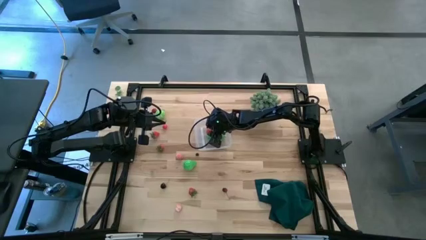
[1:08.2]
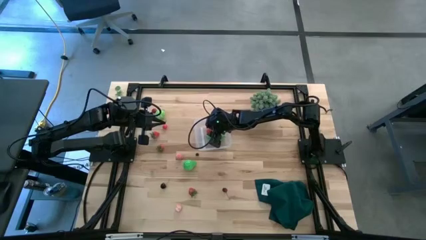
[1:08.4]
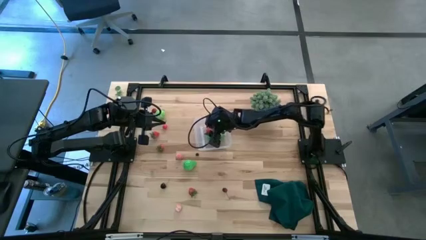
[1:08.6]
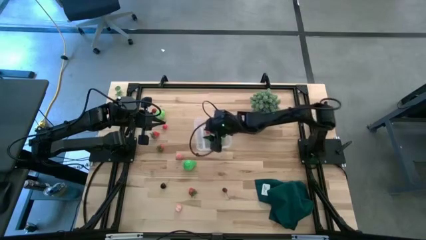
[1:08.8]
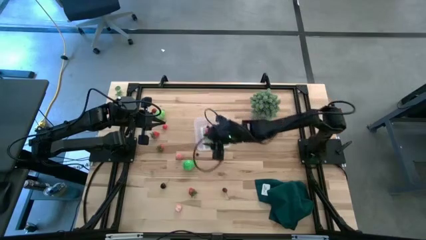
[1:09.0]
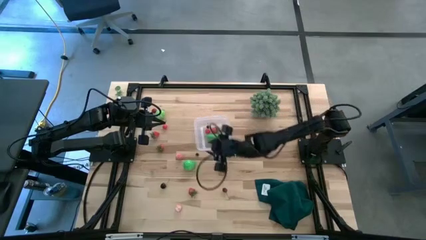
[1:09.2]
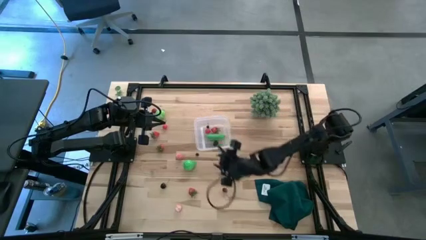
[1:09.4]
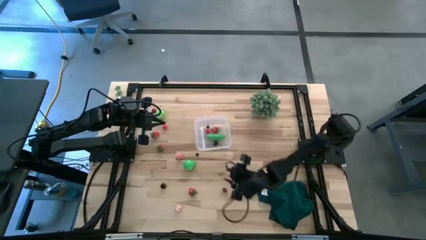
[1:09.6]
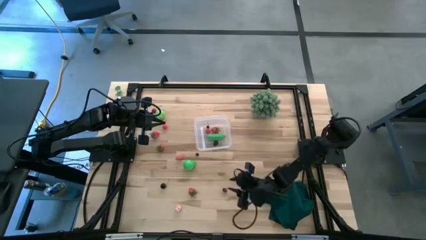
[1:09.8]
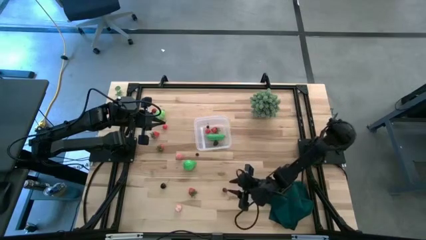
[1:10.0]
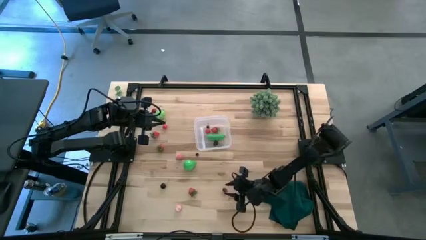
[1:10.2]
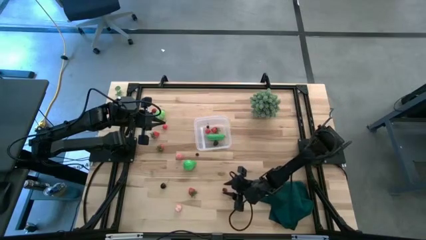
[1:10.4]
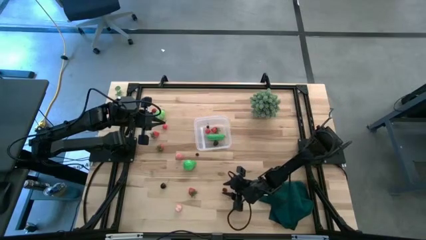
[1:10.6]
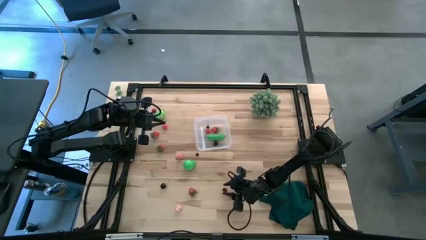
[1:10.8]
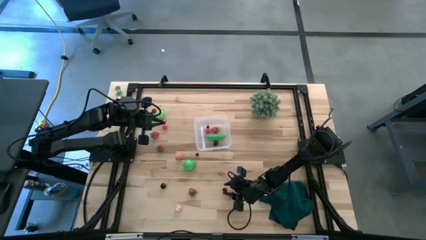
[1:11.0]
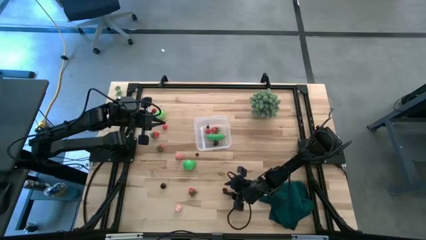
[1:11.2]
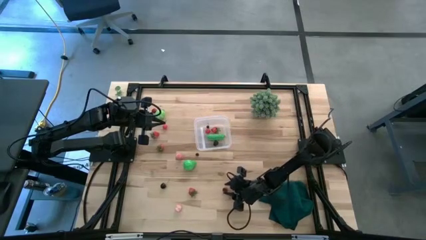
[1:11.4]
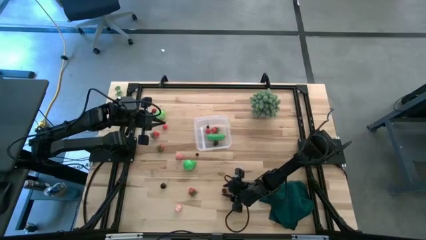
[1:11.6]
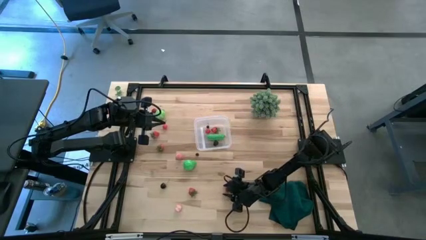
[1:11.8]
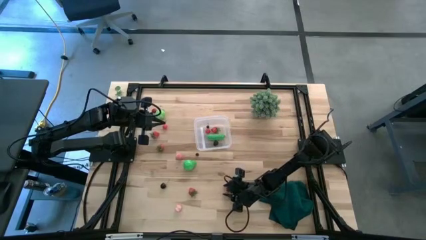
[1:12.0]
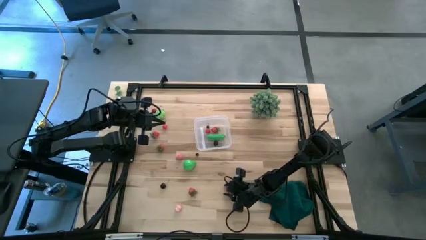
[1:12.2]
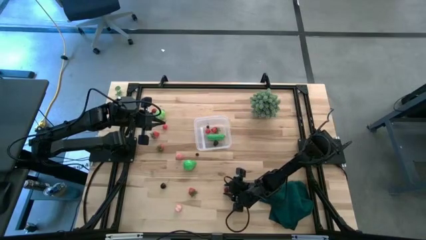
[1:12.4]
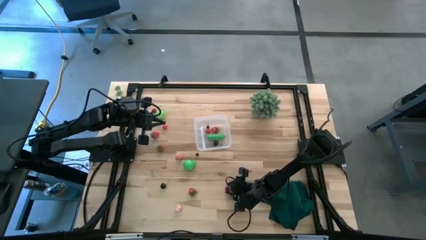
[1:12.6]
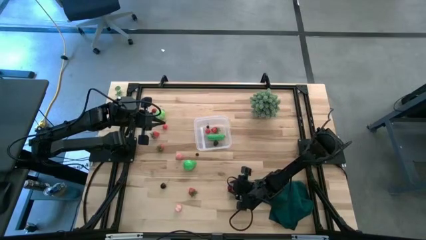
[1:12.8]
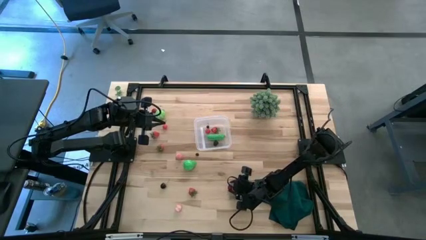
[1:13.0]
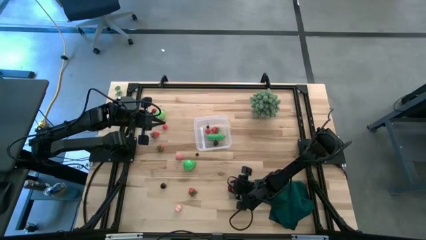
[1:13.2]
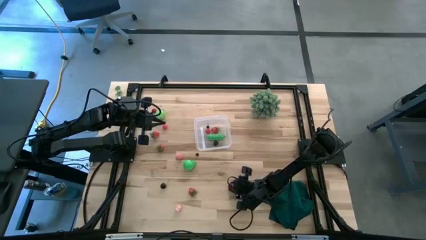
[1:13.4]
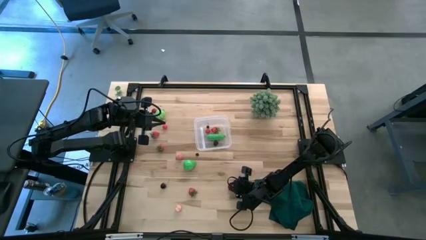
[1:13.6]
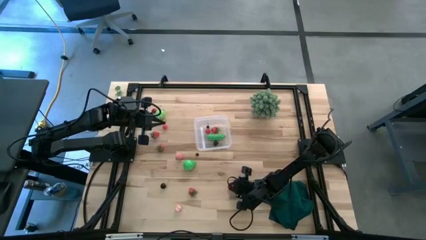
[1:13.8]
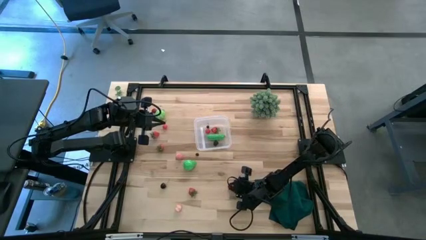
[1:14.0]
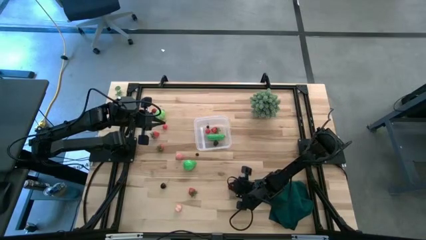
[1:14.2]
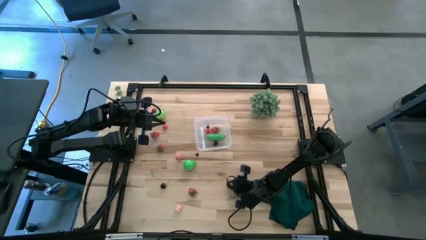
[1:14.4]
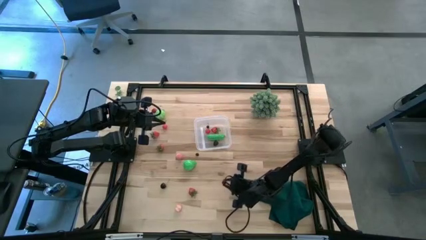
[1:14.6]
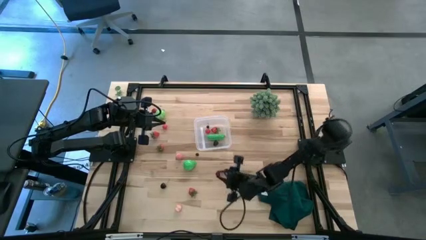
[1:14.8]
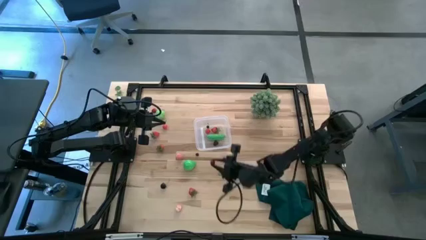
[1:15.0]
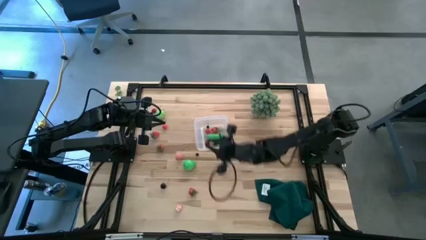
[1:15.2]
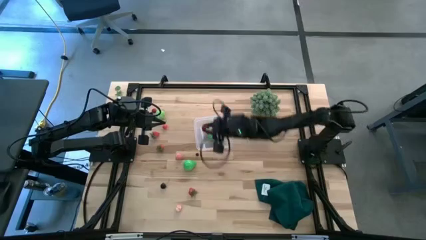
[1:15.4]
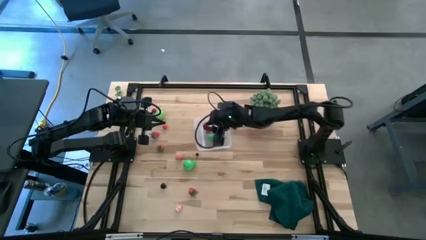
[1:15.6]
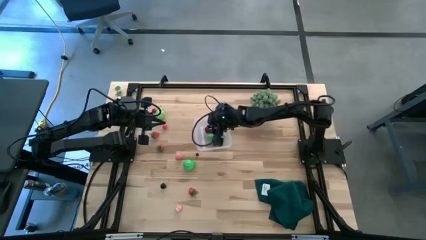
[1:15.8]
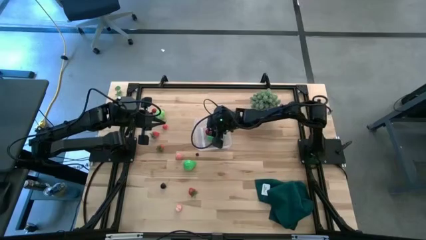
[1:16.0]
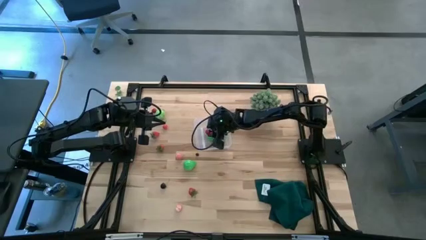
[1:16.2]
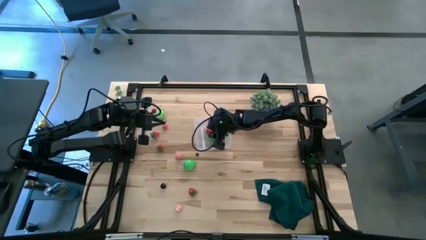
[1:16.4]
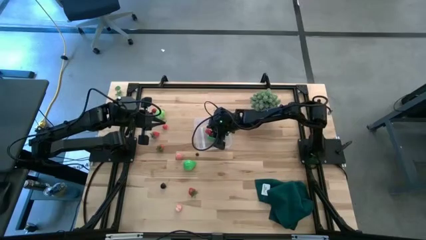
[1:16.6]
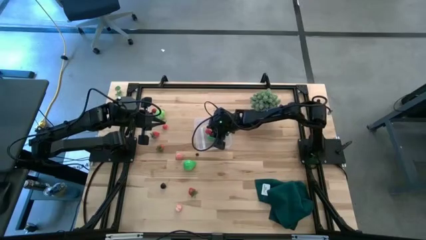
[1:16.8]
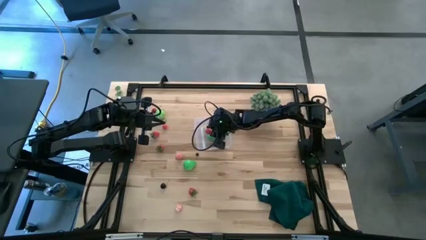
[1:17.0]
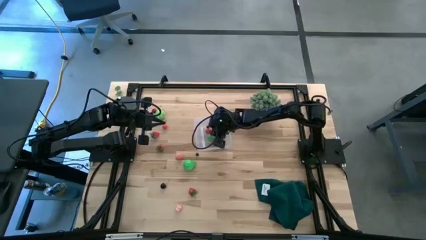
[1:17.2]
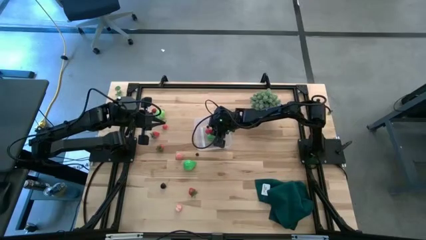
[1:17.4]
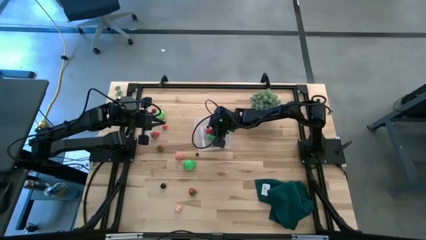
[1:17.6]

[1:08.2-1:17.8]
Task: Pick and placing Produce into tupperware
Put the red cherry into the transparent bin

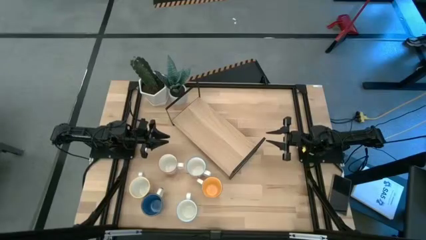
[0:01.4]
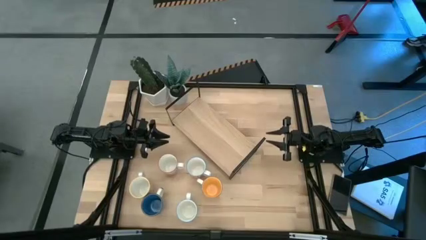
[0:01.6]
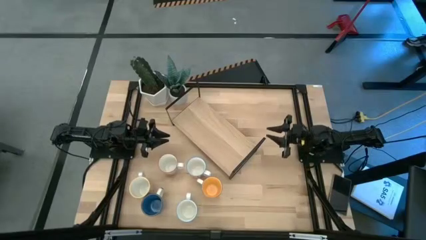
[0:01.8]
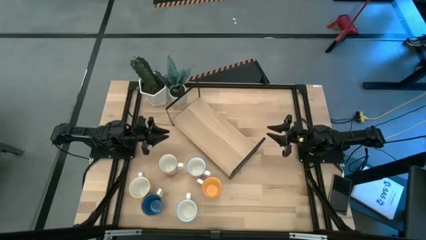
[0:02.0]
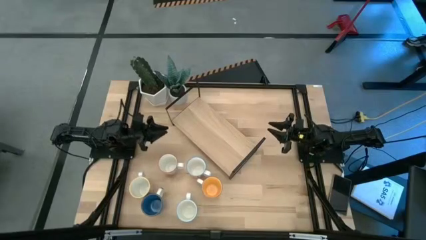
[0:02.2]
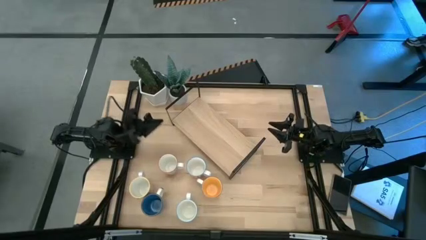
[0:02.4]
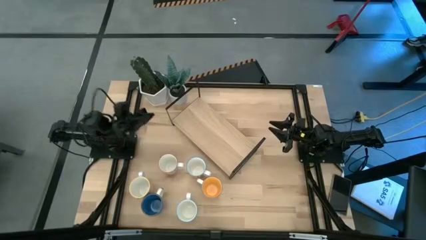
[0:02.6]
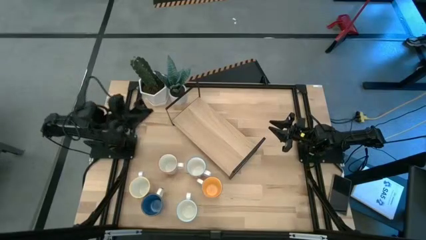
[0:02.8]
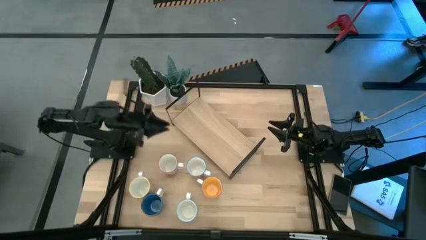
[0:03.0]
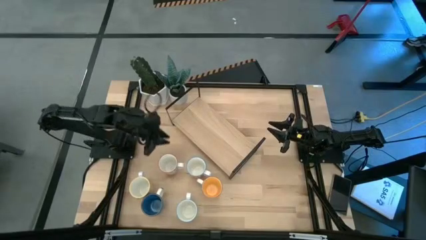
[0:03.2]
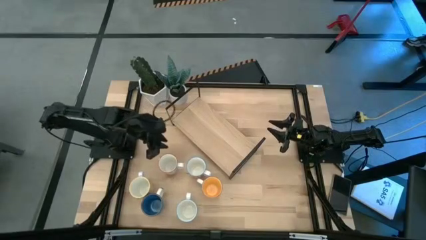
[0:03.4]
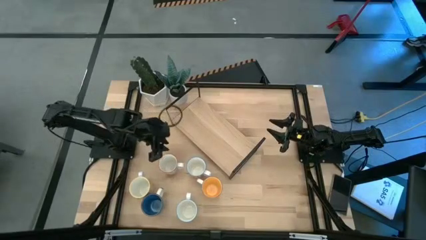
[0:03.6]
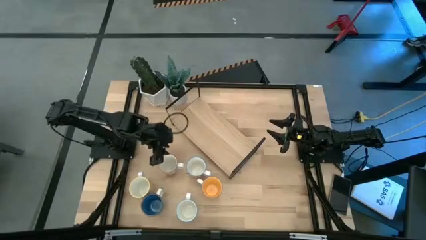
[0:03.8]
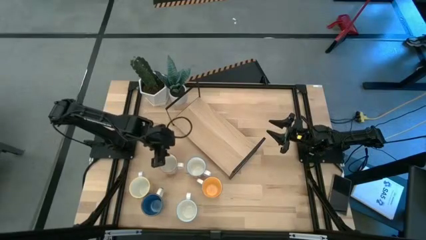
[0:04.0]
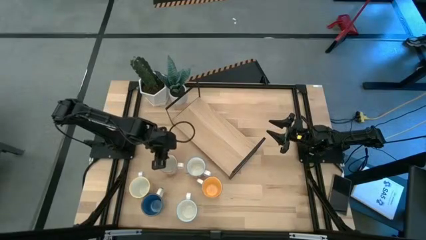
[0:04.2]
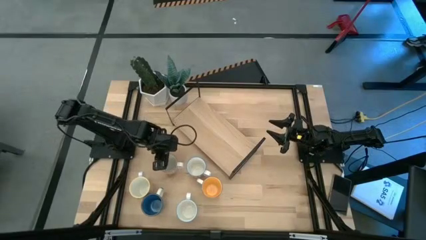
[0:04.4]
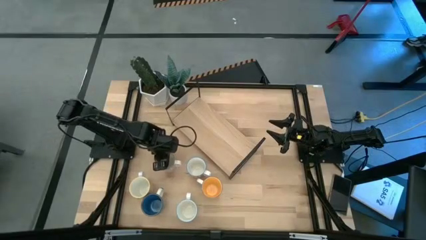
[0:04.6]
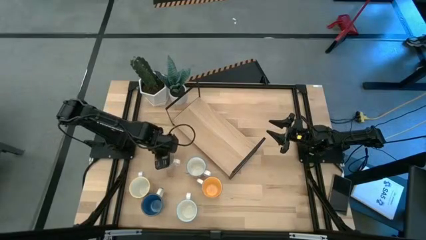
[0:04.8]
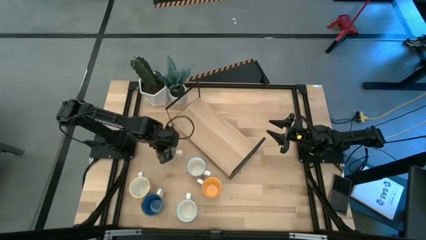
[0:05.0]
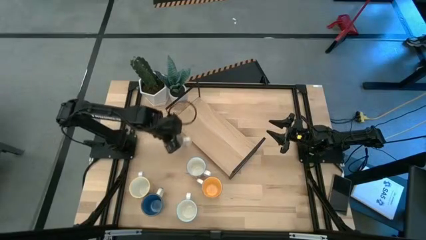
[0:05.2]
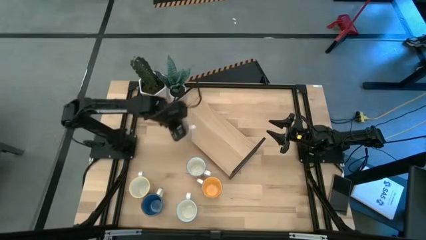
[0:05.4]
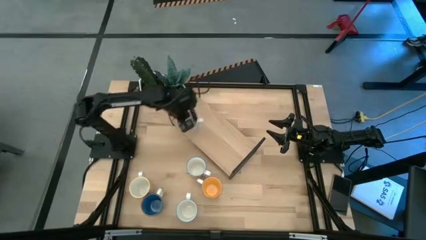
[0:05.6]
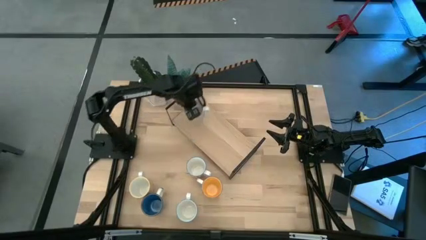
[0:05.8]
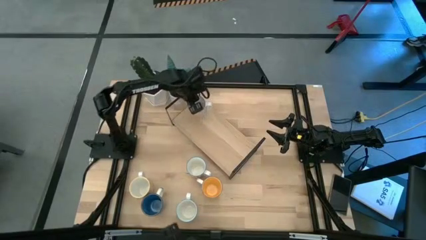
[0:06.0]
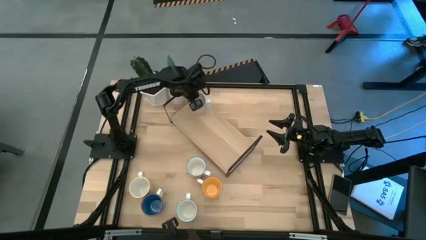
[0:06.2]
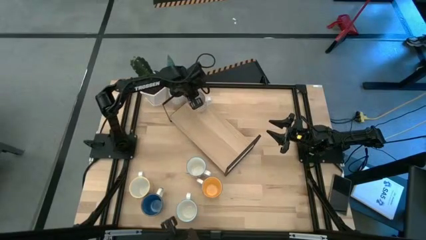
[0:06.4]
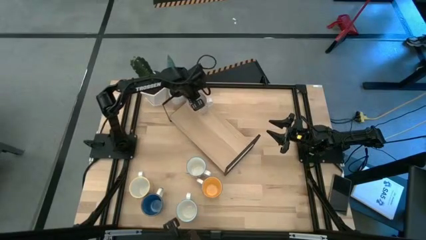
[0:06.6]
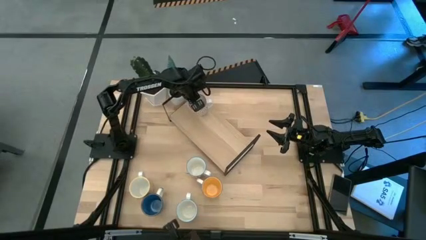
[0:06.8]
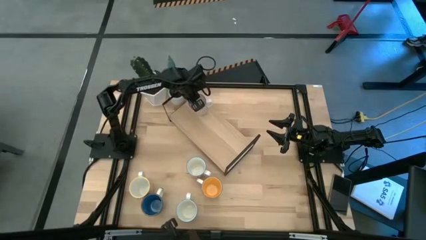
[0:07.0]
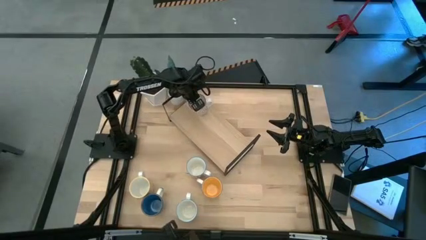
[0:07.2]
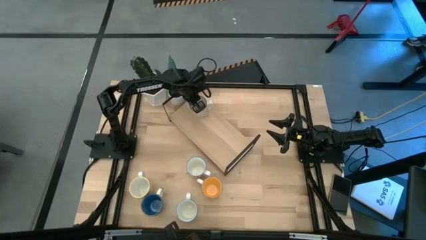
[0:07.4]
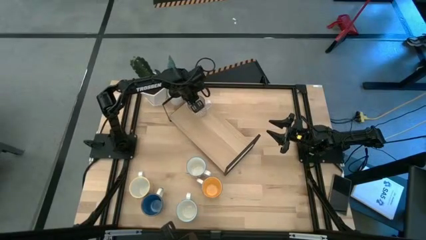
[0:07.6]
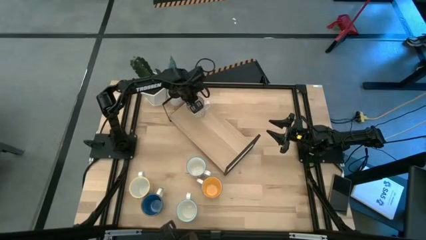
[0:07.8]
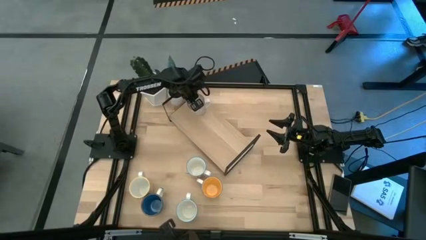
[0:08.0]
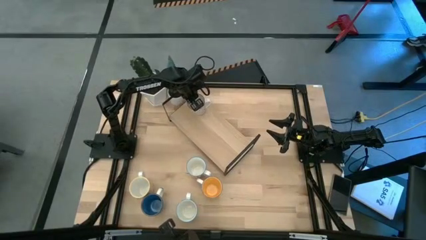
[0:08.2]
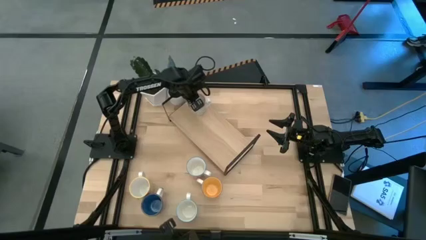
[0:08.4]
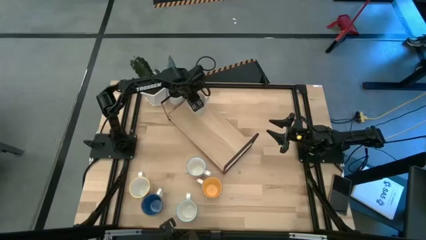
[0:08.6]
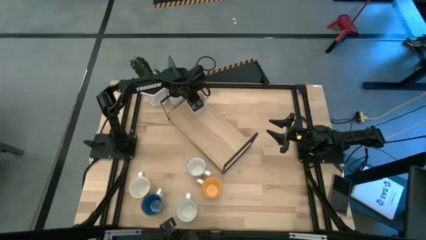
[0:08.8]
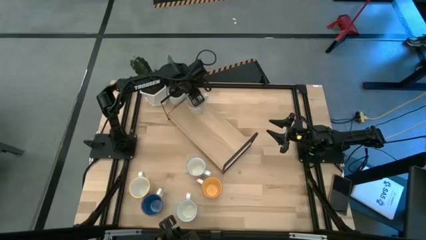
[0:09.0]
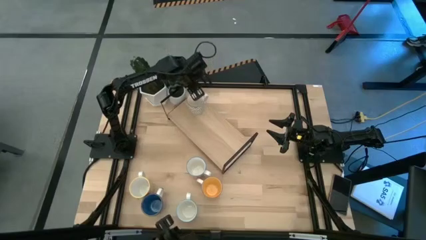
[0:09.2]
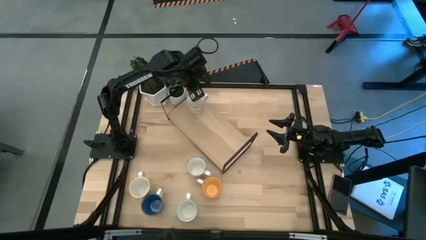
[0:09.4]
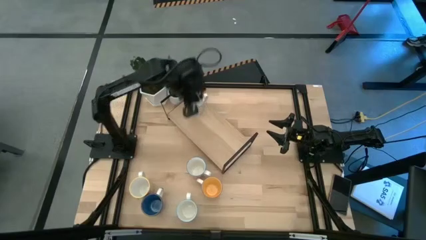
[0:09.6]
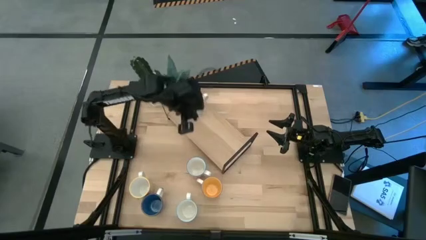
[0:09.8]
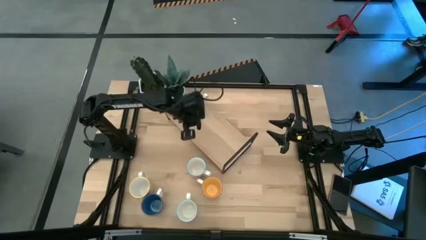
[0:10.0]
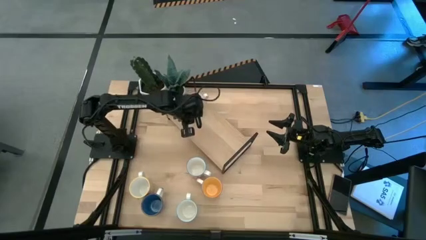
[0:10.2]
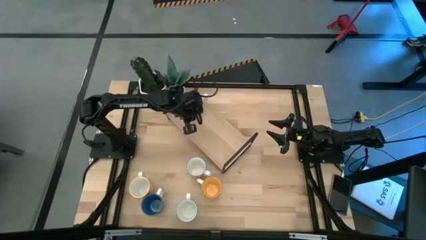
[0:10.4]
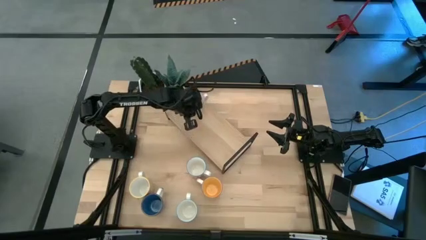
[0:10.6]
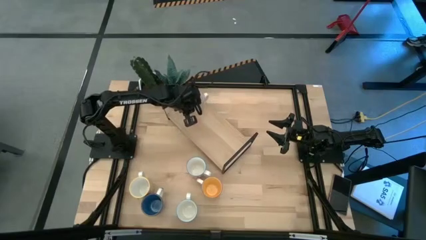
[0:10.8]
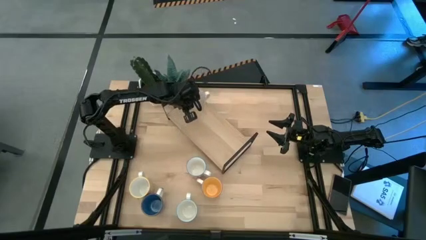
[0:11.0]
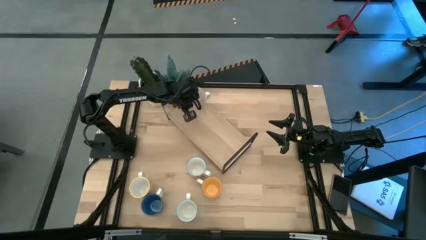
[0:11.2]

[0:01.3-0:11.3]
Task: Place coffee mugs
Put the gray mug on the shelf
